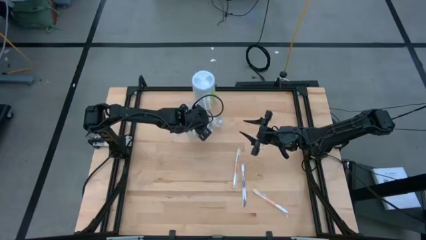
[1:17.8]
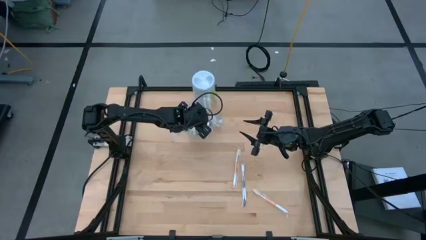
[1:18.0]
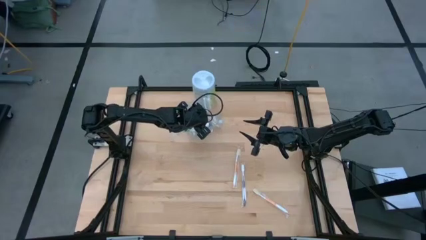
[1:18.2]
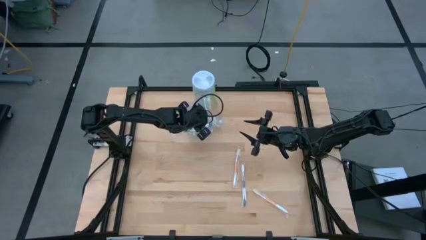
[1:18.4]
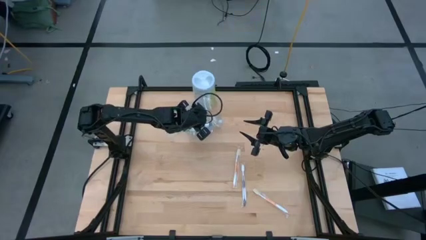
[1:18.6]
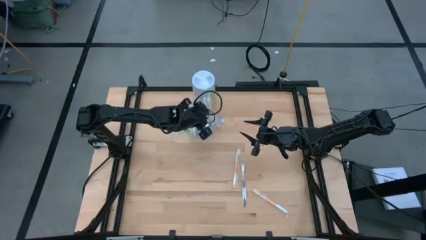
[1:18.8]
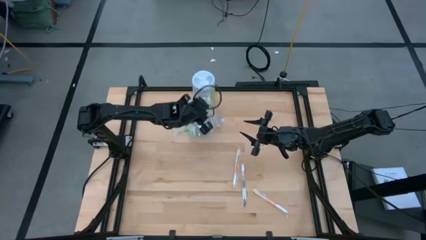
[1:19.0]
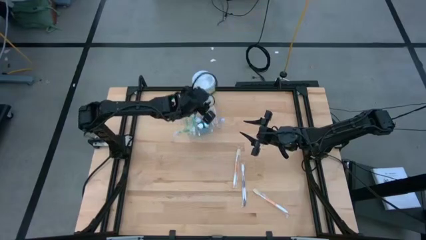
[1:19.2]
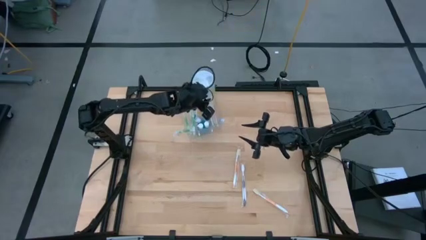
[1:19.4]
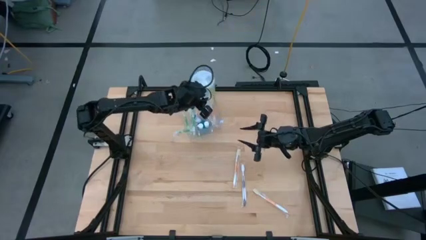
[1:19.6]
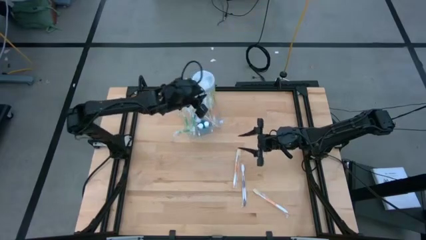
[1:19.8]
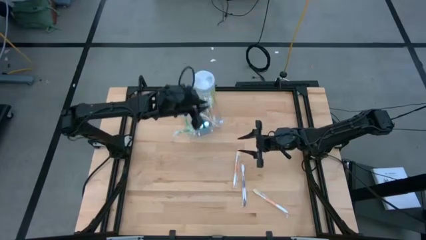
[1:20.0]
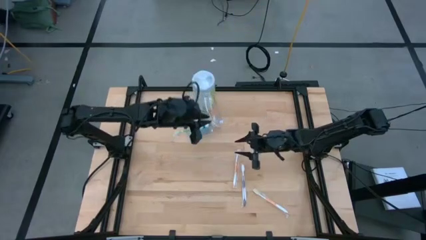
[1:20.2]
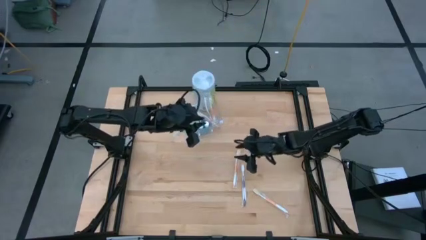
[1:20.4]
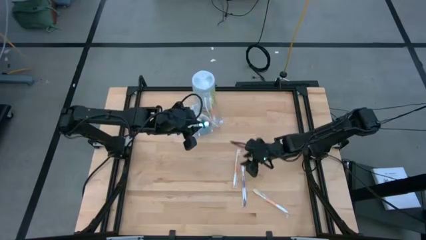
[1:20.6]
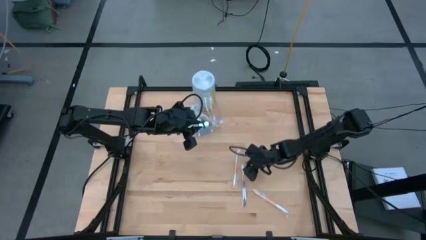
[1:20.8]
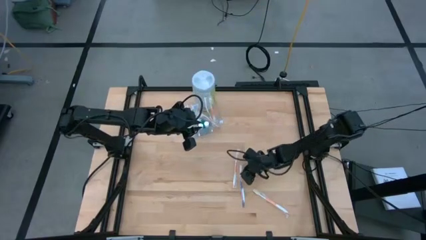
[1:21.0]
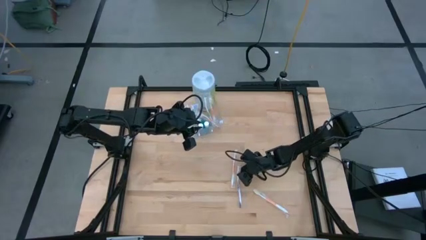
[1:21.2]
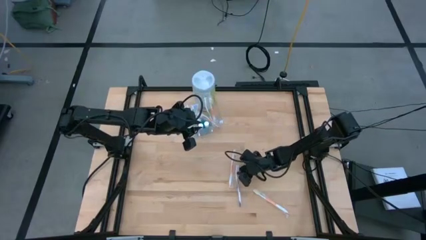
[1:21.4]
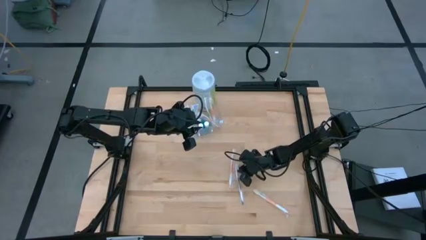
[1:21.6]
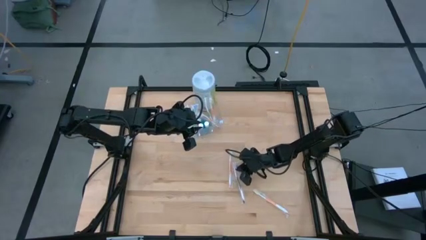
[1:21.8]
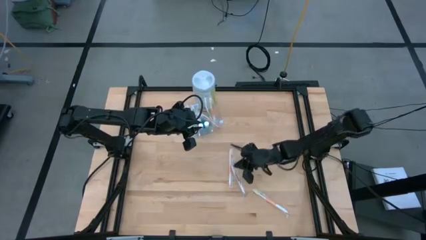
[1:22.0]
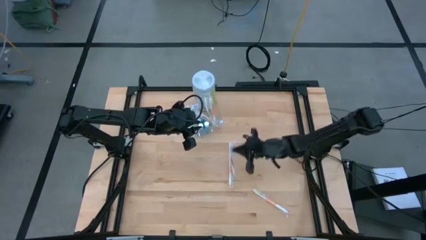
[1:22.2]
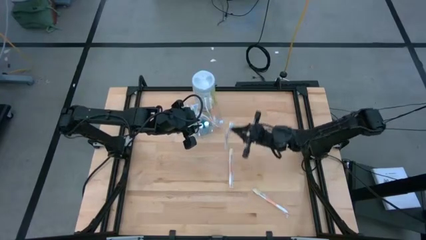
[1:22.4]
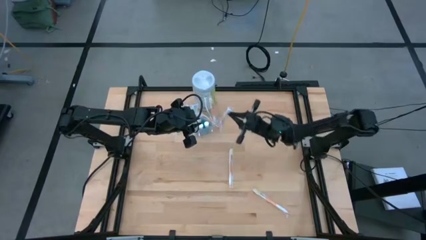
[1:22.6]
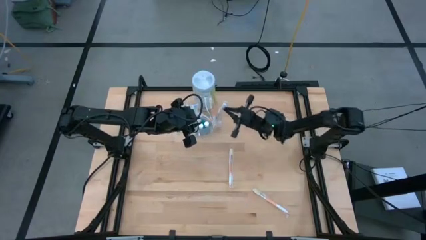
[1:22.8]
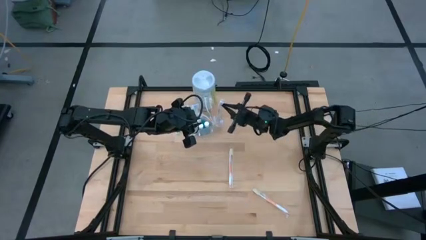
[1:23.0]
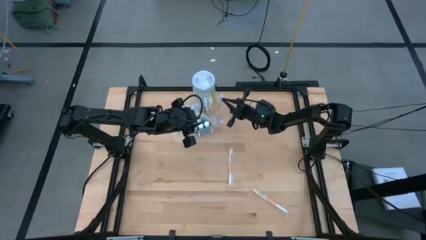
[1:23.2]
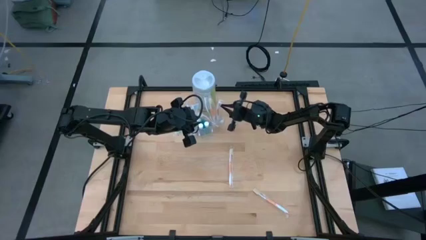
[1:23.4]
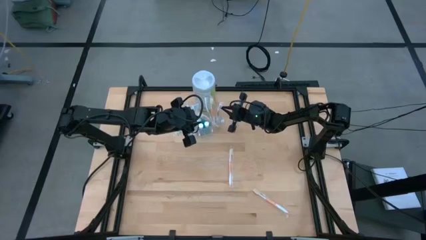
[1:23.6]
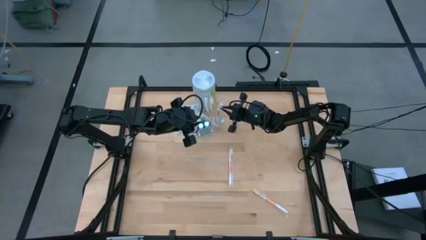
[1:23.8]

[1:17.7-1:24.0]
Task: Pick & Place toothbrushing station
Put the violet toothbrush into the transparent organizer

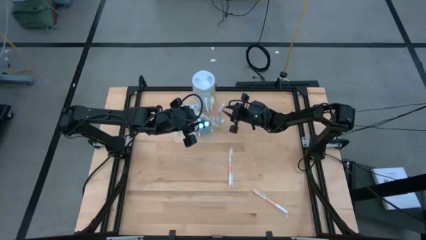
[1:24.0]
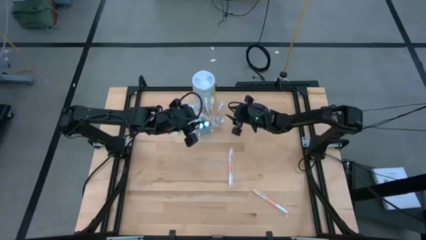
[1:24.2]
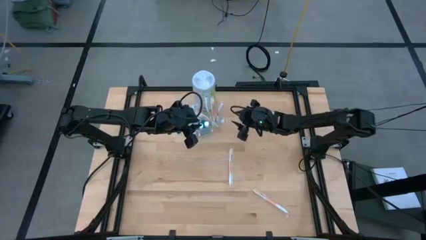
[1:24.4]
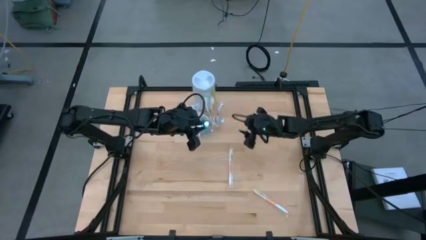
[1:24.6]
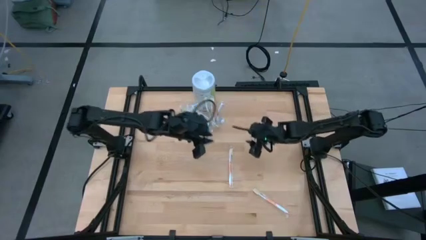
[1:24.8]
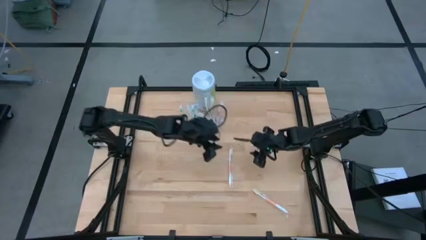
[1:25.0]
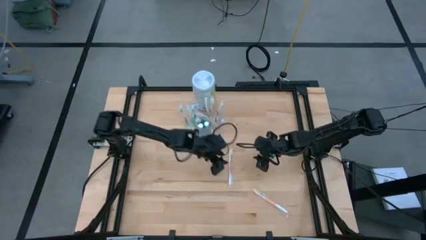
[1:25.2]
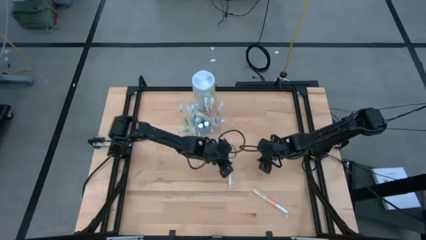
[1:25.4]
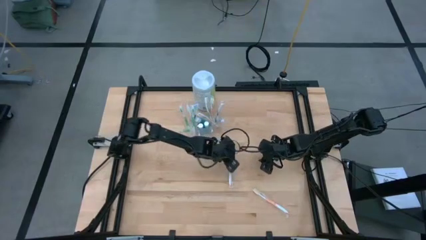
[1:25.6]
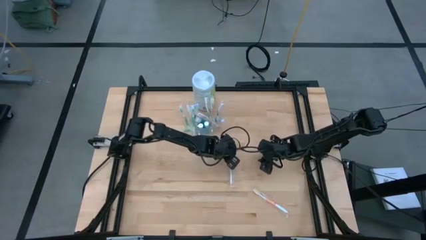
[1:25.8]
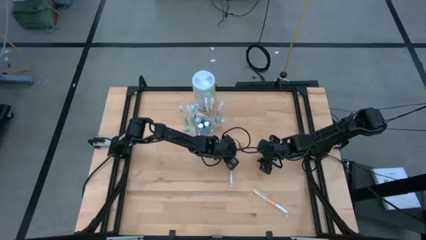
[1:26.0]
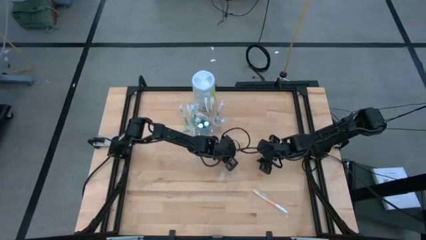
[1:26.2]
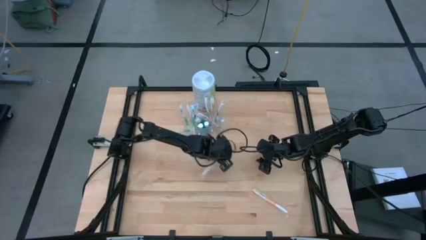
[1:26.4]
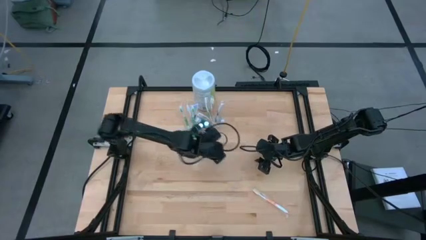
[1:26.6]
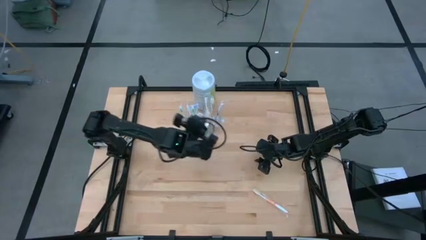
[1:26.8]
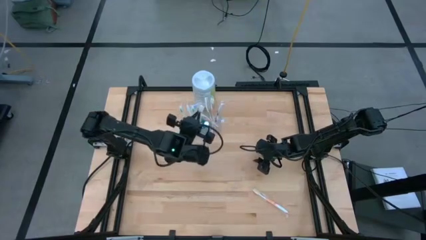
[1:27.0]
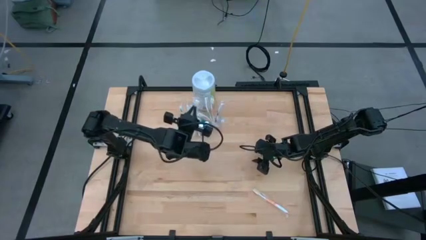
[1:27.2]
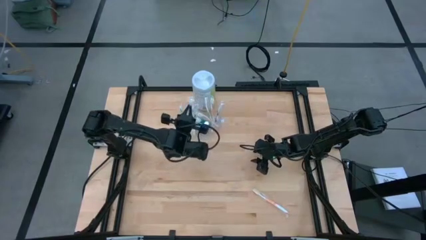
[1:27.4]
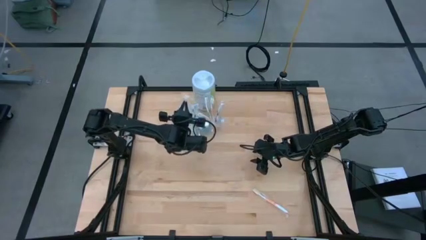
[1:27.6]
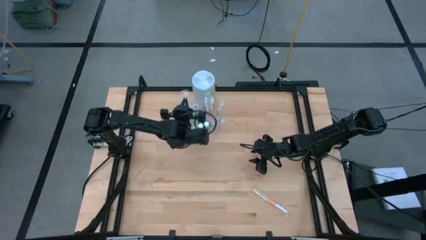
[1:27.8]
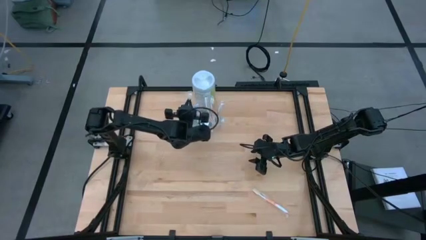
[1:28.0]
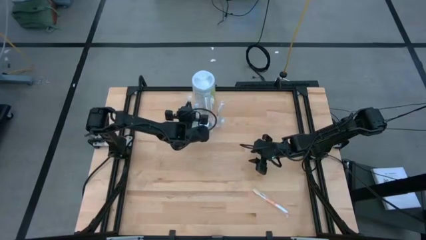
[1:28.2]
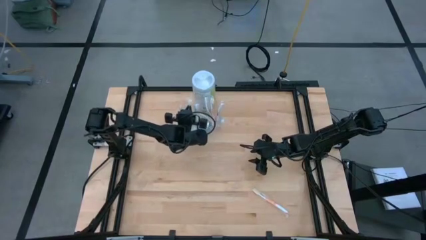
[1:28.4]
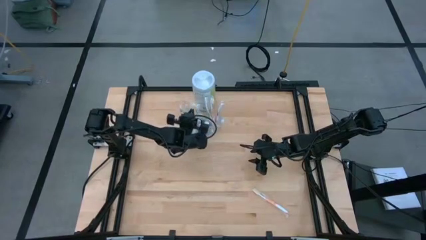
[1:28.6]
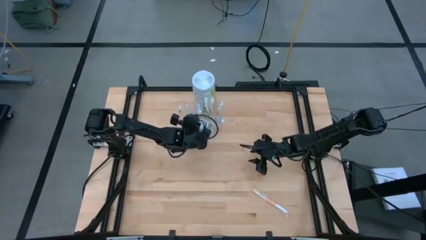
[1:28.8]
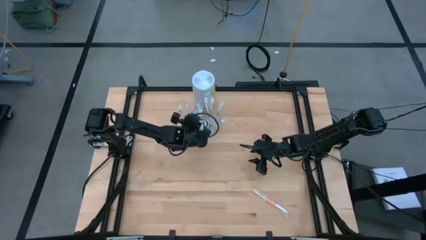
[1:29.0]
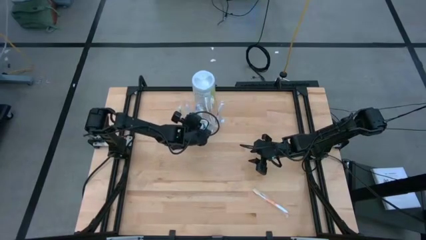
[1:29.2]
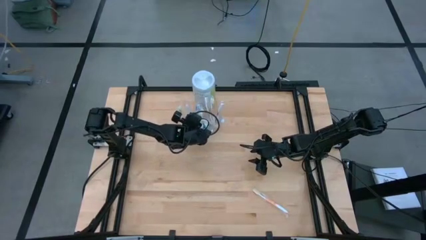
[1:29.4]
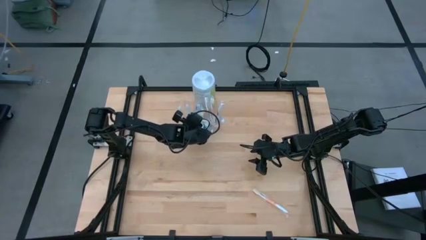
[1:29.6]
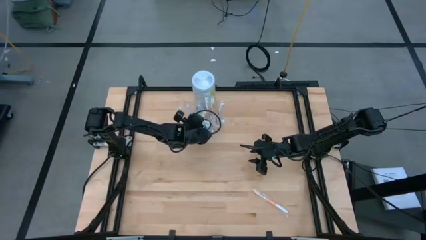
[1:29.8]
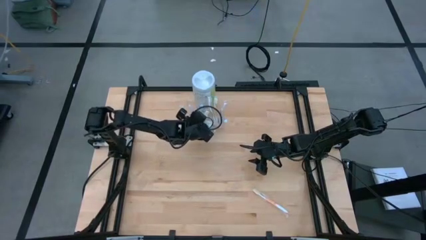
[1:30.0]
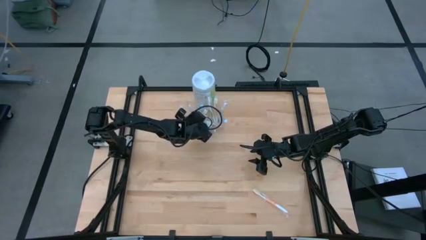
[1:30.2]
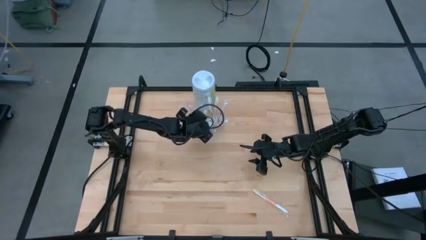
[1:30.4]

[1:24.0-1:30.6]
Put the orange toothbrush into the transparent organizer
